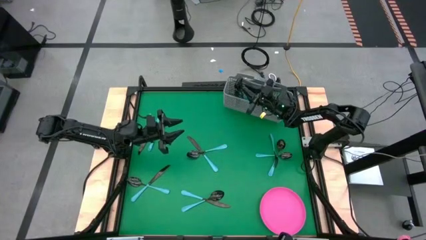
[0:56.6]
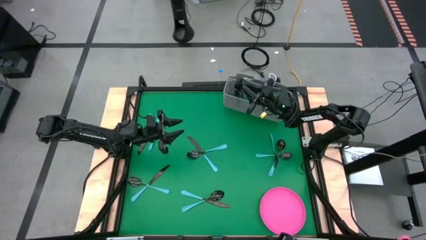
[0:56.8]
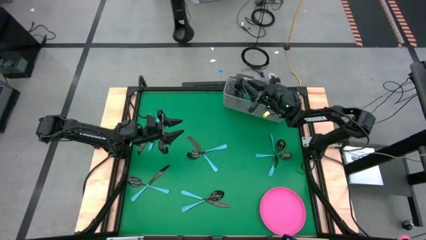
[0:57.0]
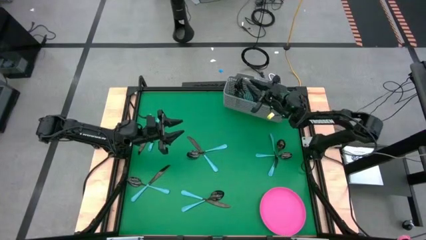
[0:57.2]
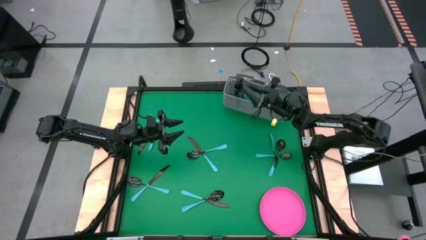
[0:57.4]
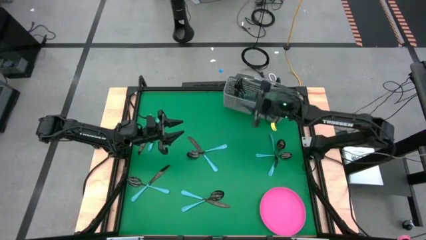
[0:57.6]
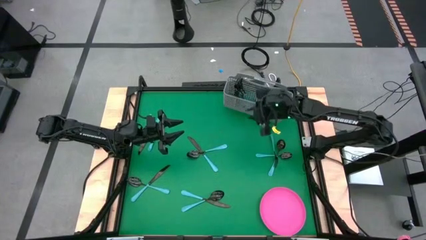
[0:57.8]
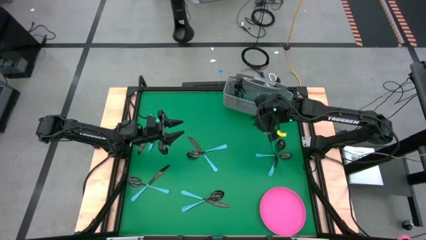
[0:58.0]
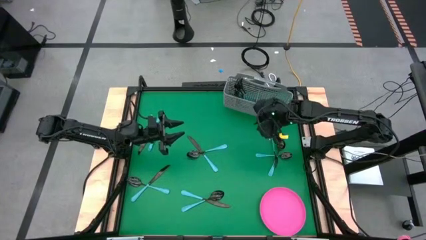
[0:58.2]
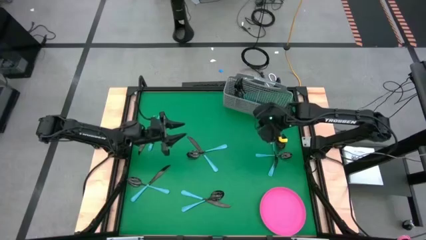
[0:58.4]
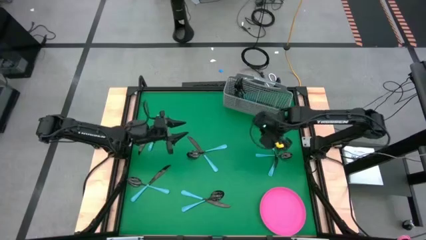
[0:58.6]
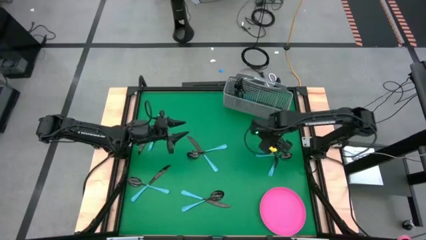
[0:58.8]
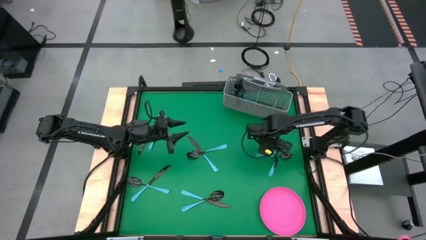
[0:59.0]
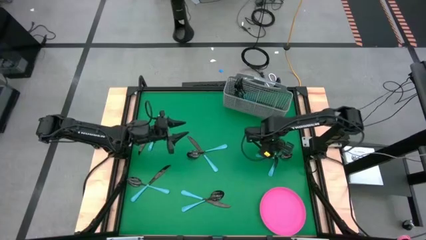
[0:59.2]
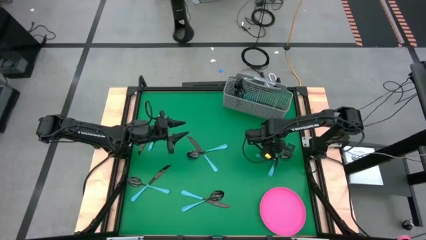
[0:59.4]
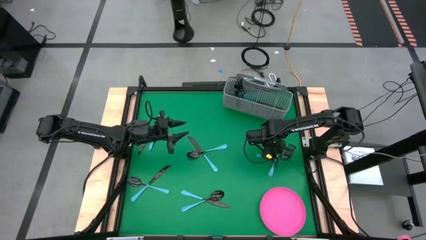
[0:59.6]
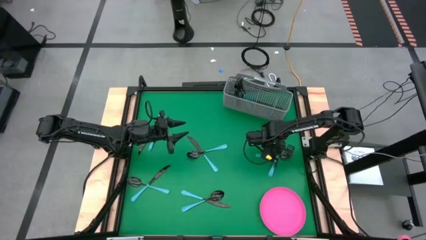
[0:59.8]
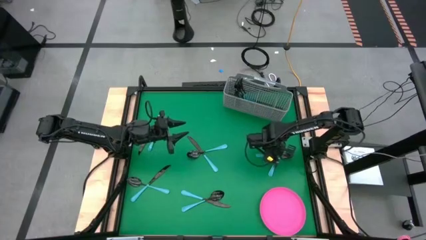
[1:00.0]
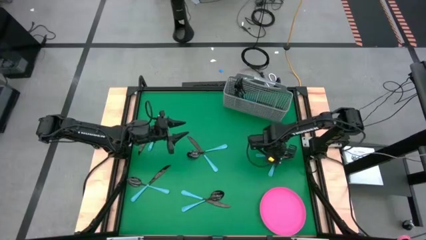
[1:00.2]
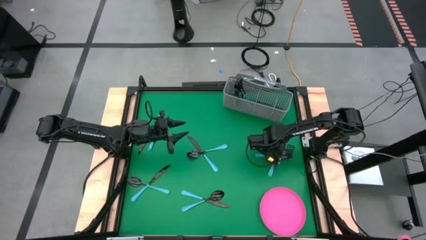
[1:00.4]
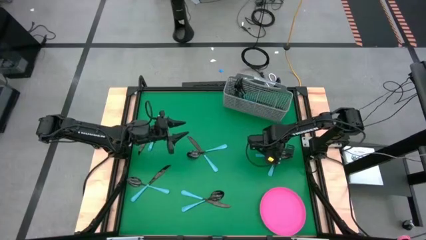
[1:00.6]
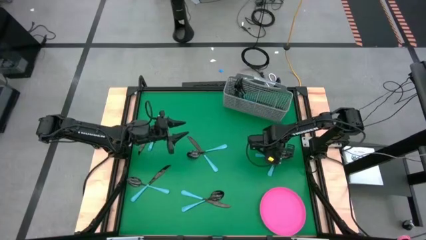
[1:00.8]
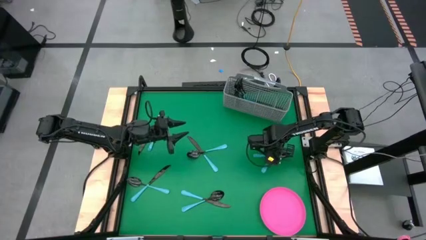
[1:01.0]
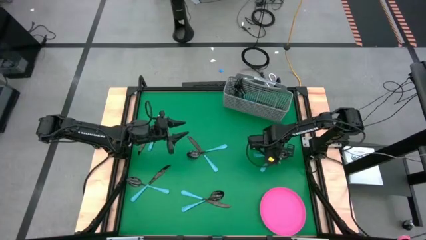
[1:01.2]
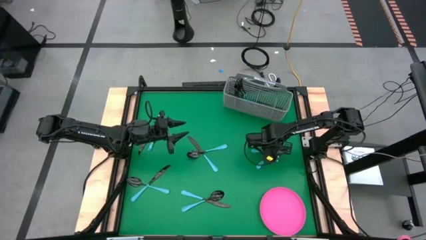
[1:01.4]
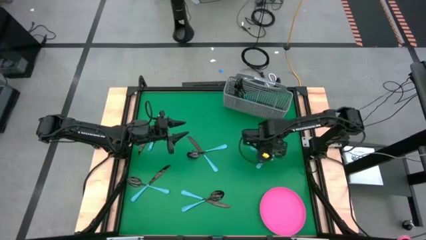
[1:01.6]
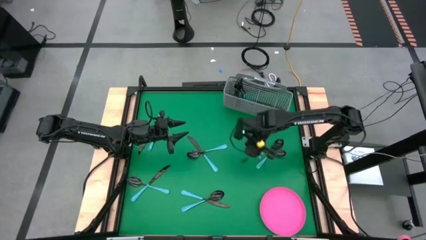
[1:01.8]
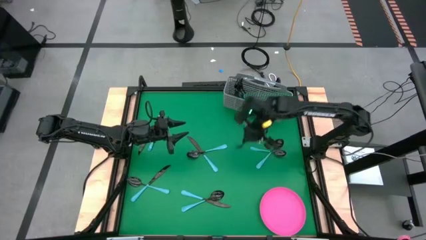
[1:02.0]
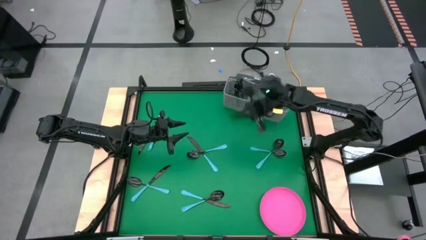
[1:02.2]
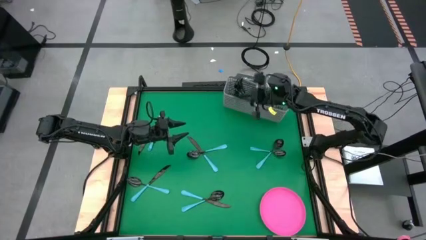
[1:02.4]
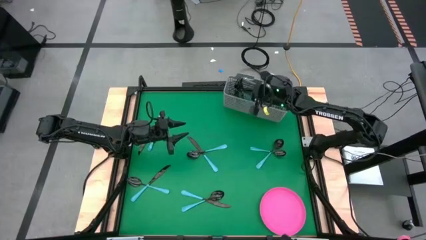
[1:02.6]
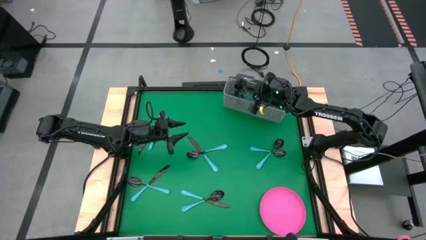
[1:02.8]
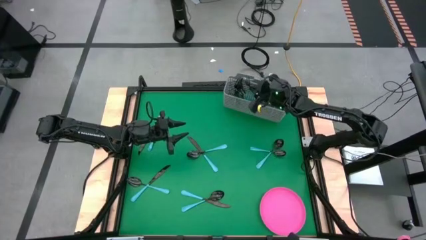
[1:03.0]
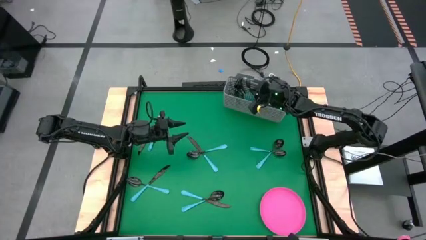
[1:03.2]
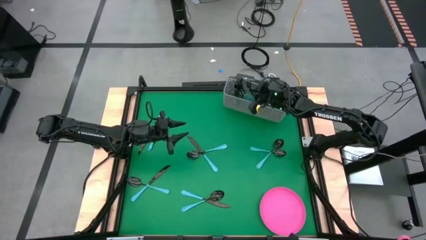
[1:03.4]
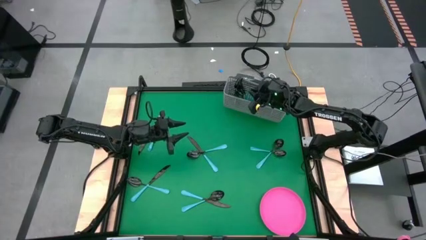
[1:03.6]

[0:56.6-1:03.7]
Task: Sort silverware
Put the blue fork into the silverware basket

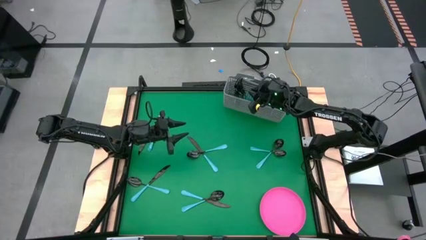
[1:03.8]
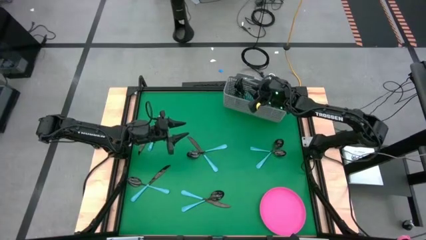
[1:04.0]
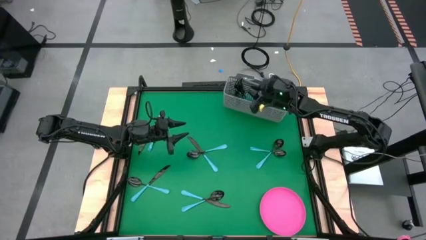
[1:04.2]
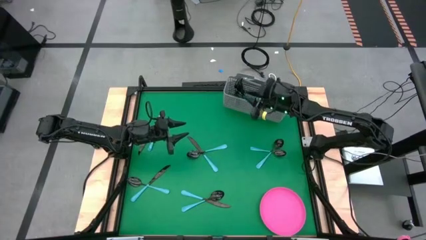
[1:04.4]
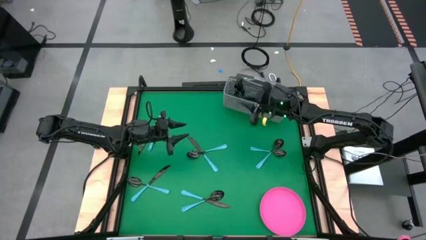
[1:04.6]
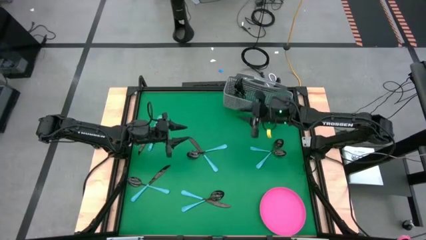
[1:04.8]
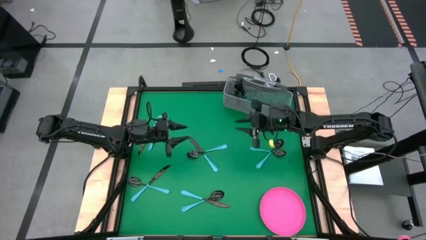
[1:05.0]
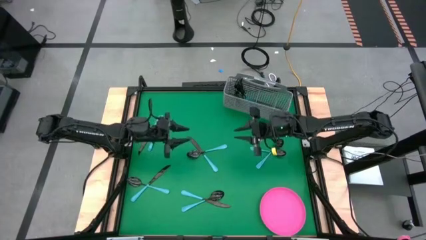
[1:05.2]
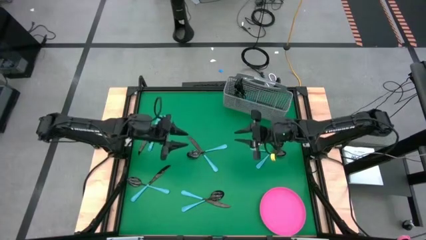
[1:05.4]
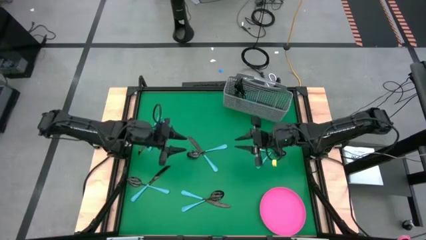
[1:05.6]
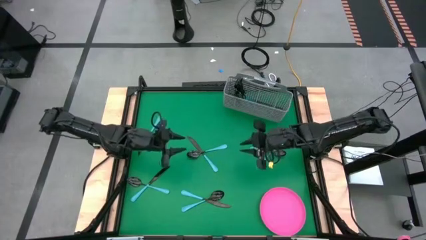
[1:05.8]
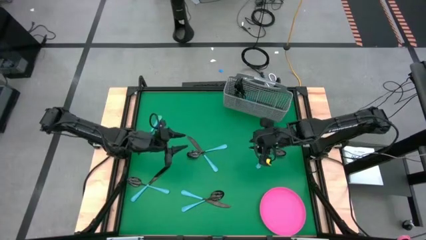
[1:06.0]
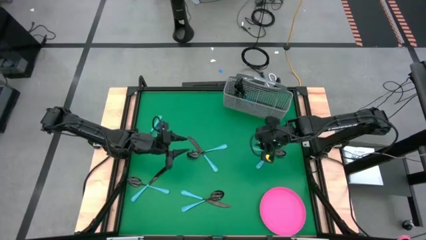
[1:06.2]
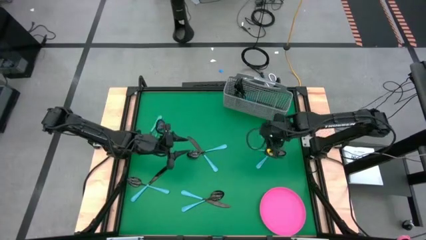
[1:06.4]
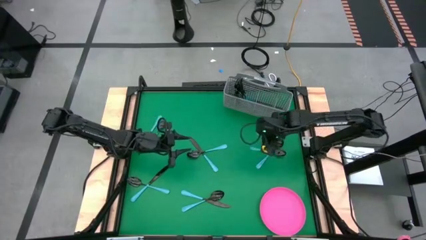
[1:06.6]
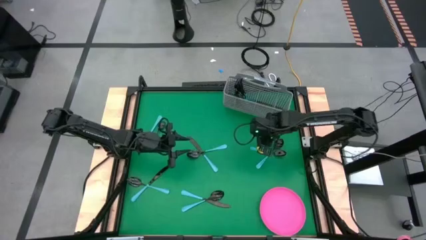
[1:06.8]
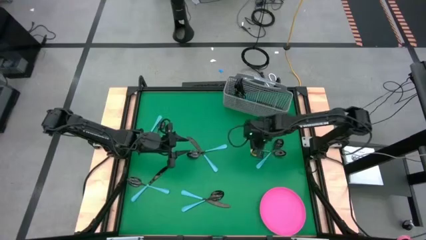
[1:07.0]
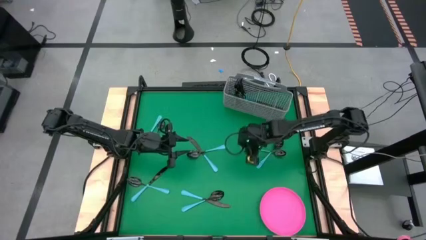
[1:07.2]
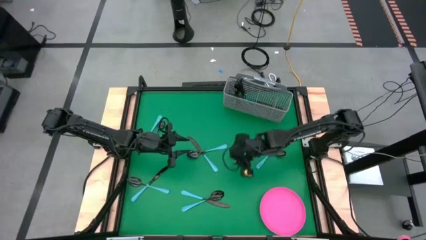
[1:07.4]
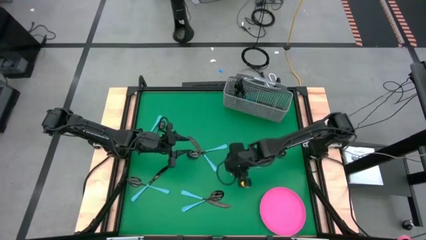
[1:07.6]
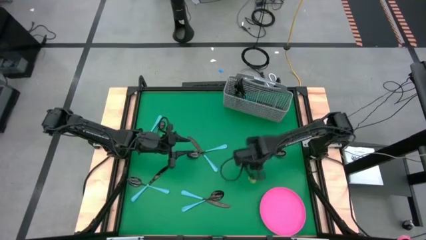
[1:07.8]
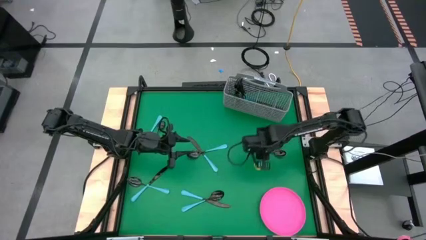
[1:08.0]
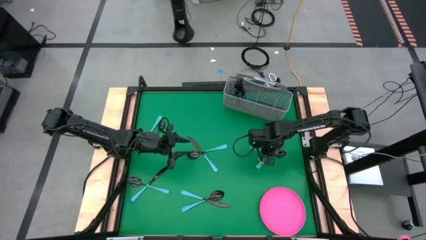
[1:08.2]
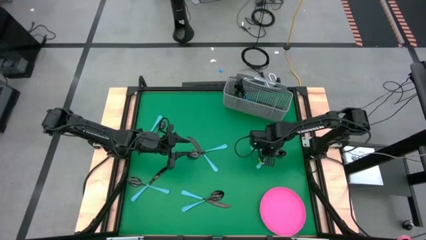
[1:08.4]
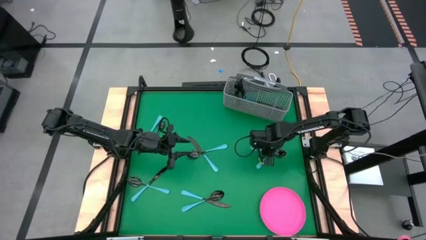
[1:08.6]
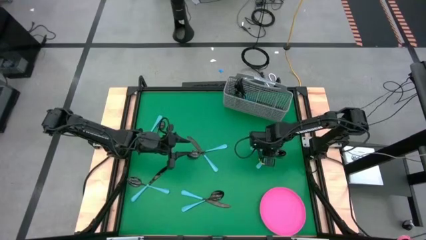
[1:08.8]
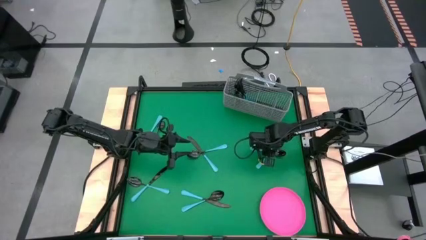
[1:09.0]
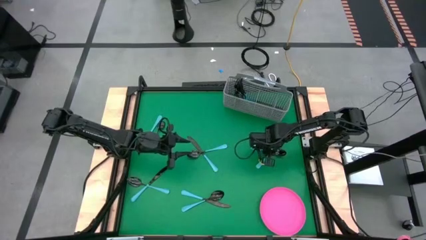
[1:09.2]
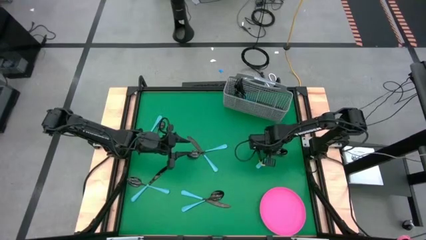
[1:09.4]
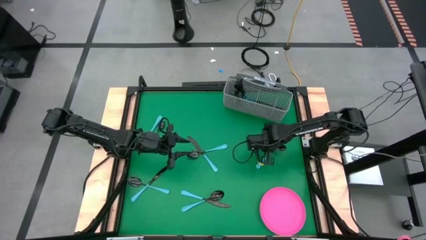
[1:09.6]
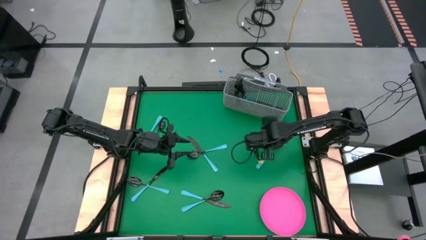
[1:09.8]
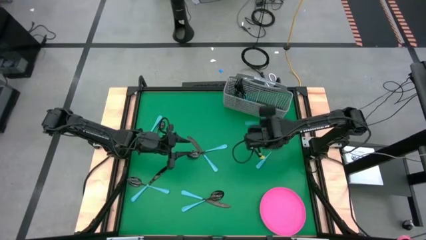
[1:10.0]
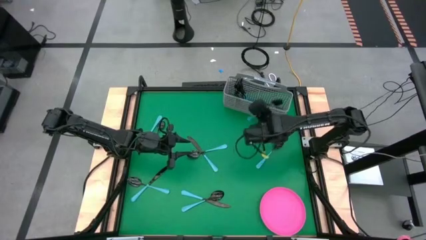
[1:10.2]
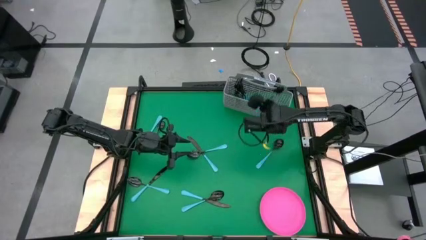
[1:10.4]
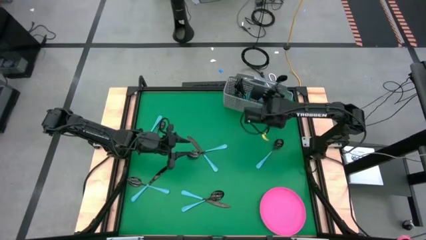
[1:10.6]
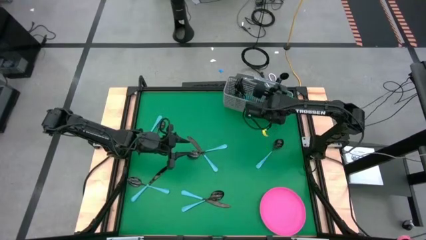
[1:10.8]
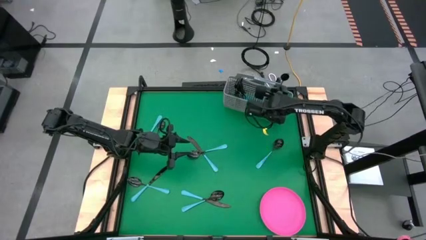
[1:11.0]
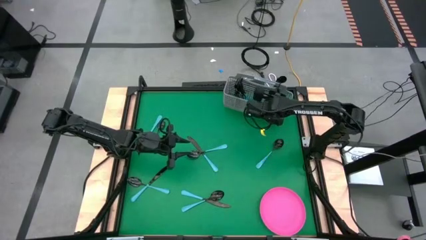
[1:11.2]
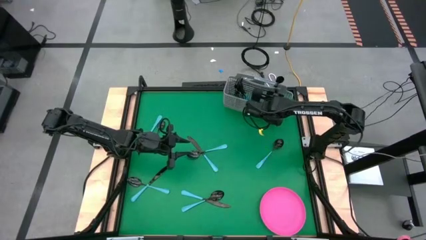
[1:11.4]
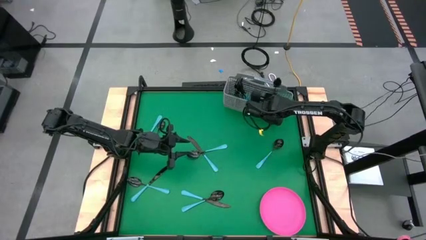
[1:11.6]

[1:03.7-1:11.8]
Put the blue spoon into the silverware basket

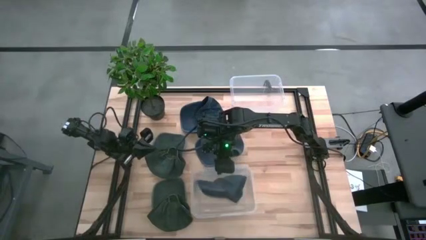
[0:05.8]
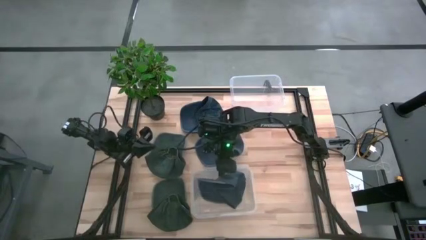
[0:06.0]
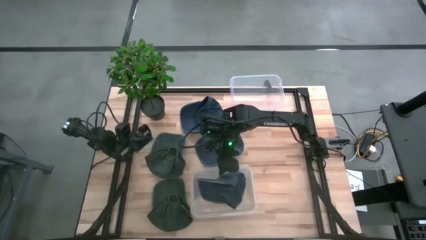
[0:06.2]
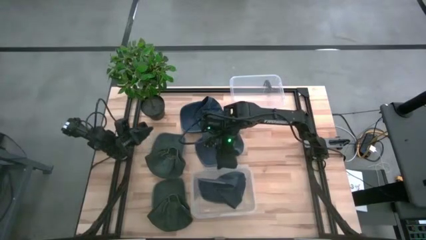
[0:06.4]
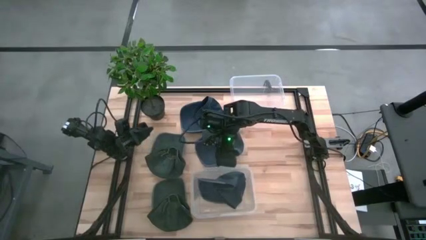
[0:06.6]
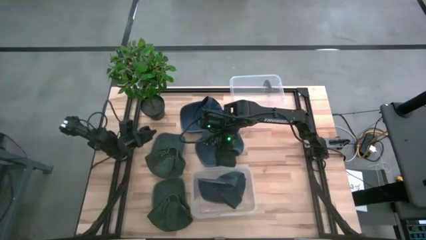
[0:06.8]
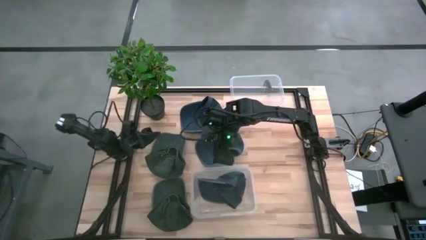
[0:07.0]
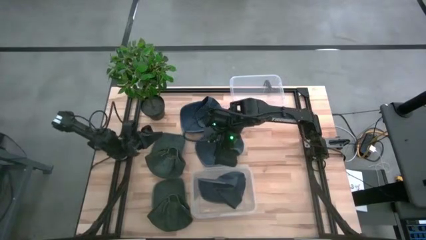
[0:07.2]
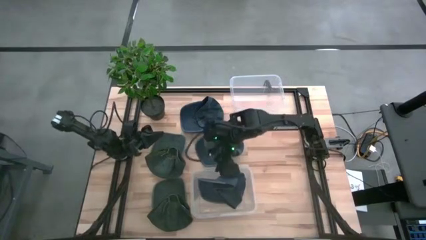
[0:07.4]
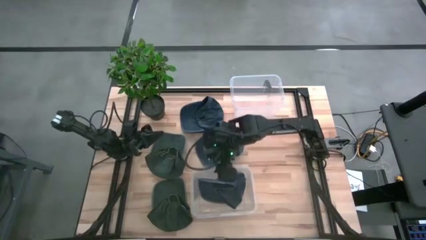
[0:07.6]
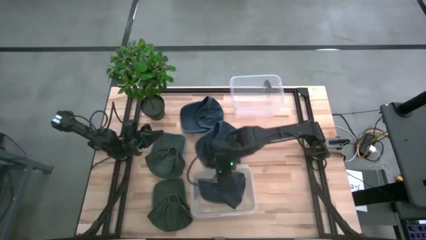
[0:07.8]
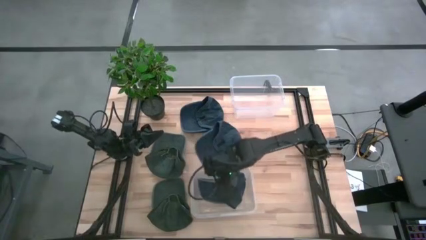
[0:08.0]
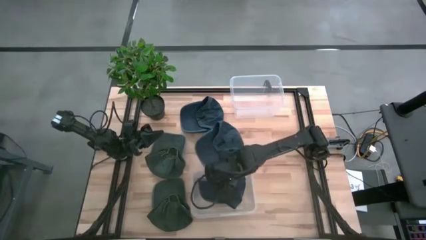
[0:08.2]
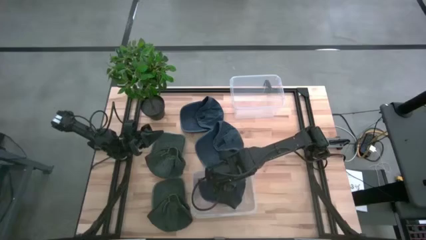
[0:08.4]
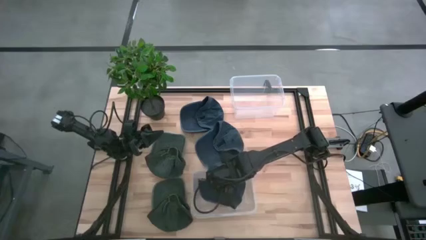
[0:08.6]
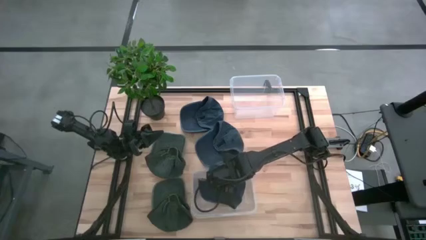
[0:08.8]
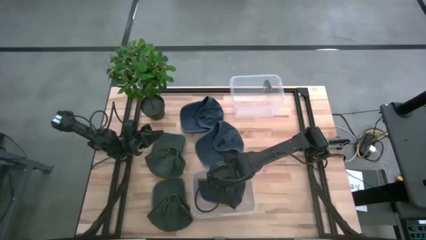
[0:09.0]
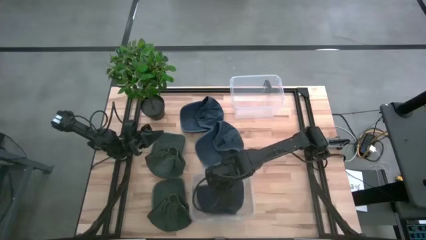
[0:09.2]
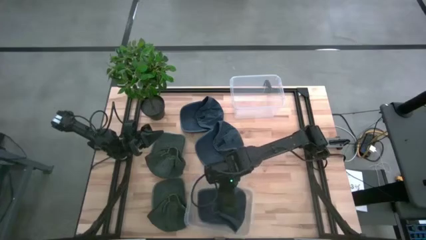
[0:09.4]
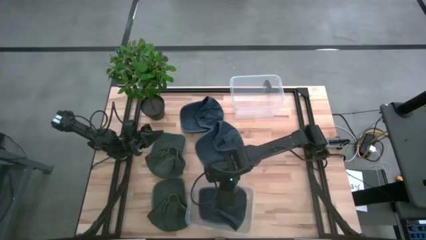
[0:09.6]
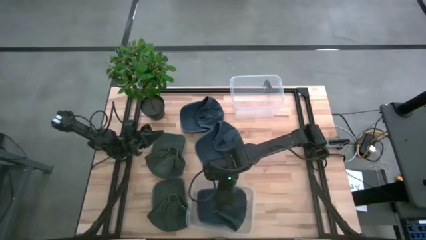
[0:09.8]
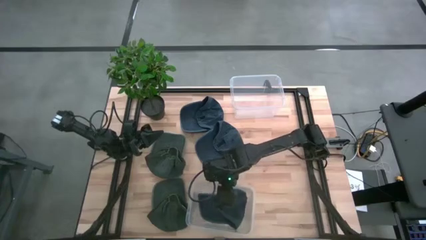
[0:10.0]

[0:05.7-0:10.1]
Task: Pick & Place hat
Adjust the blue cap in the transparent bin to position it properly
